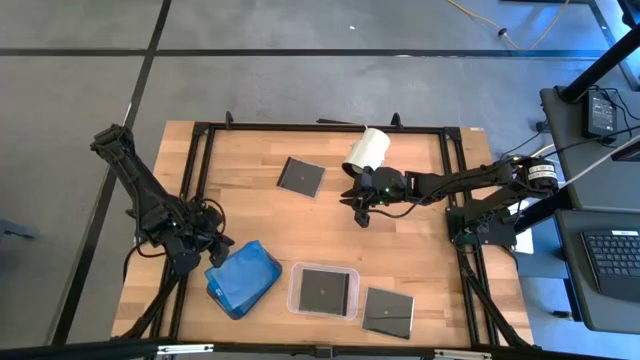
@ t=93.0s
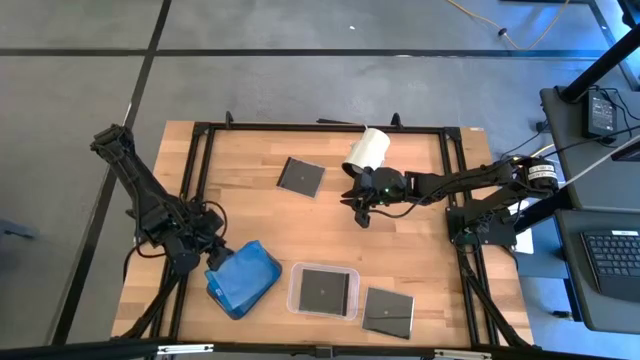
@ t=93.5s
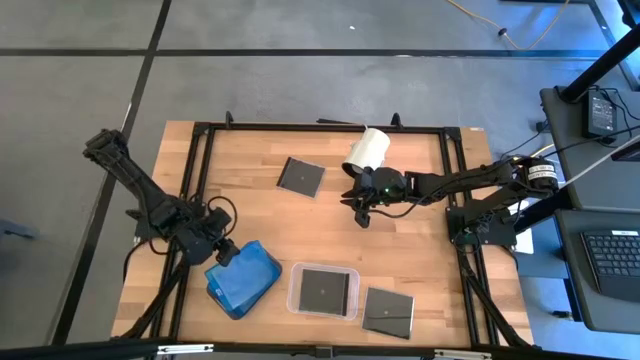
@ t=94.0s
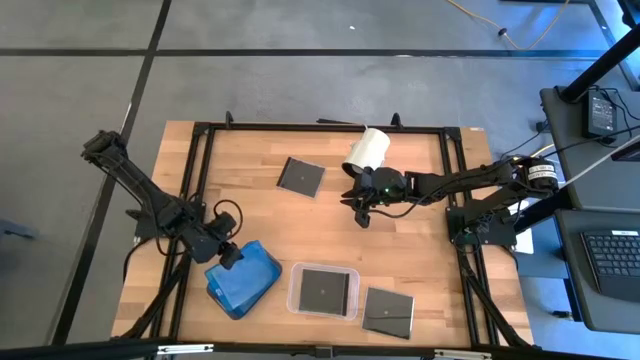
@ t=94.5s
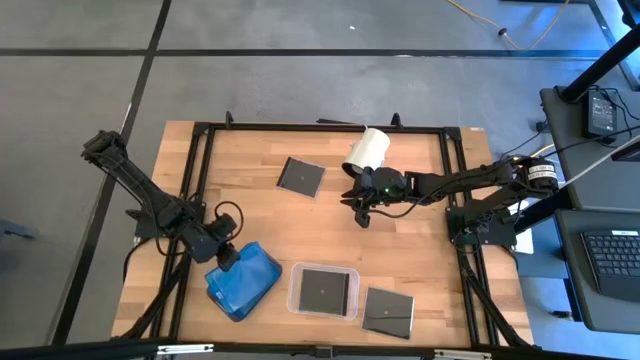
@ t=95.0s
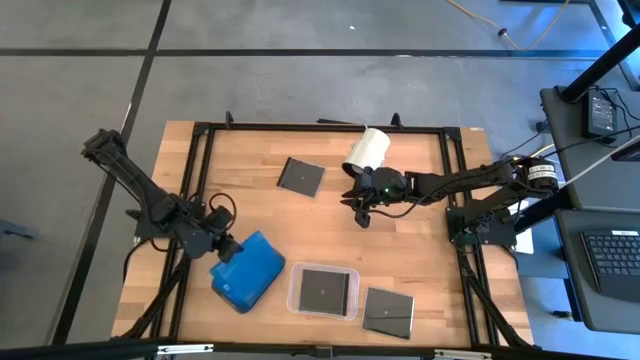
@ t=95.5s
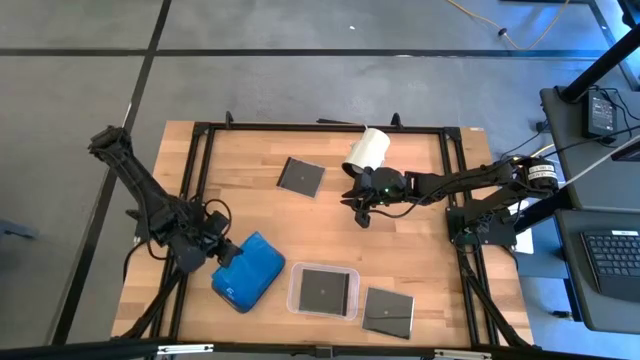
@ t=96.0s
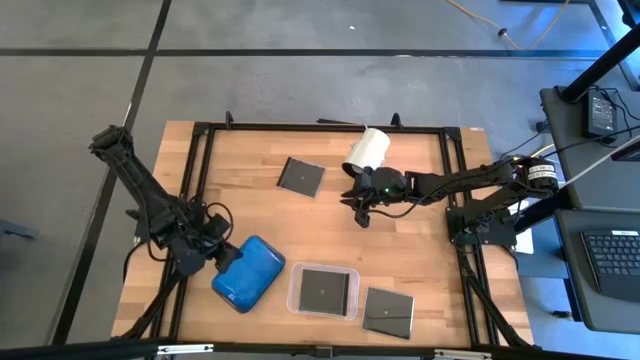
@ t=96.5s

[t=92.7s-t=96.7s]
Task: Pick & place jewel cases by type
Put the blue CD case into the black bin

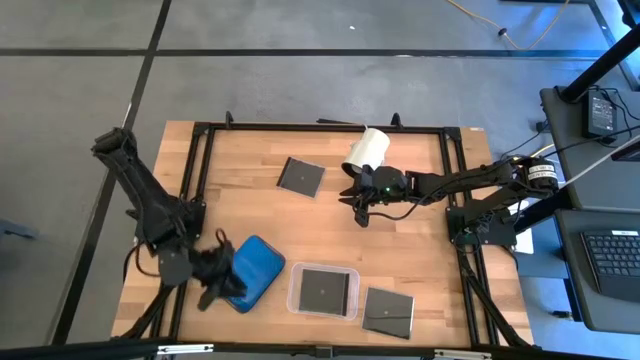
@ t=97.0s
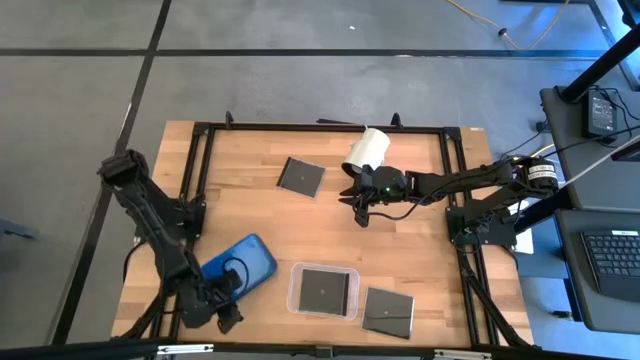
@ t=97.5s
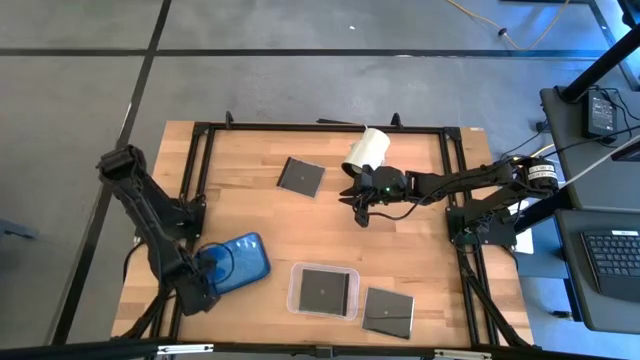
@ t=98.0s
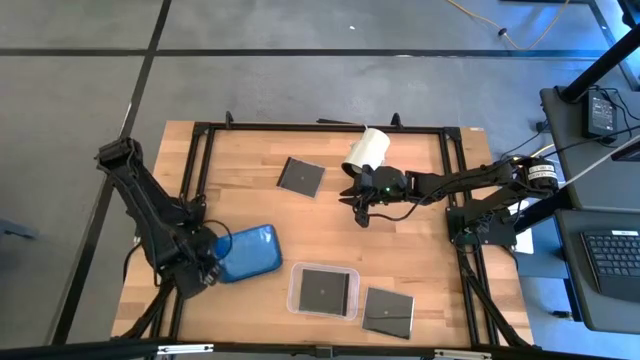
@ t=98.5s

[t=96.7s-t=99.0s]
Adjust the black bin on the table

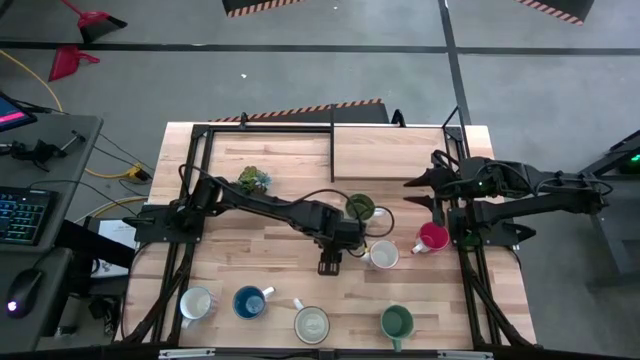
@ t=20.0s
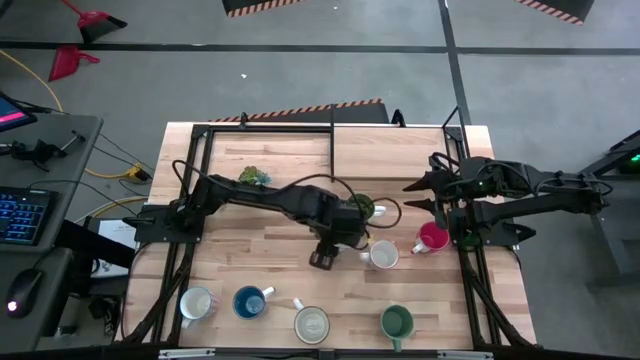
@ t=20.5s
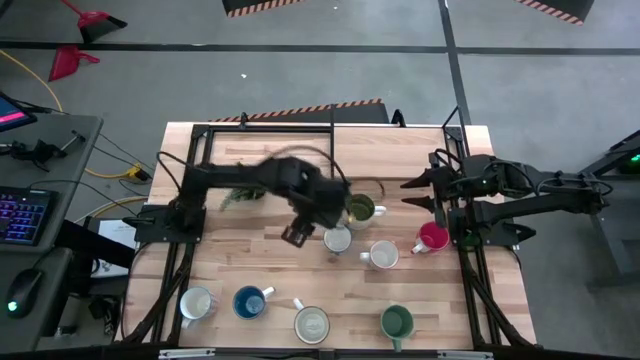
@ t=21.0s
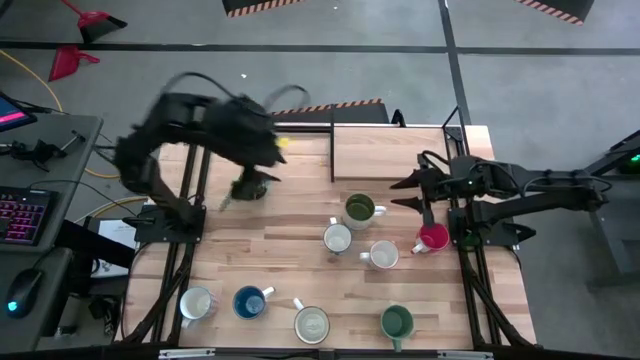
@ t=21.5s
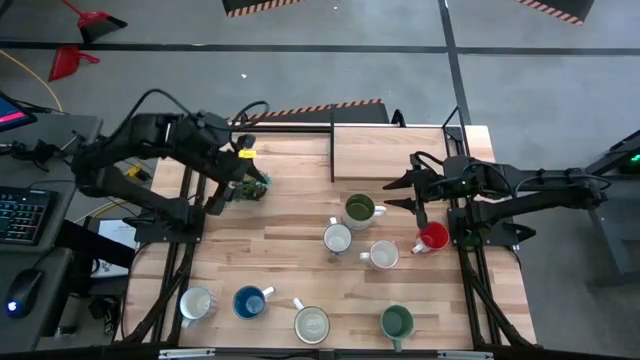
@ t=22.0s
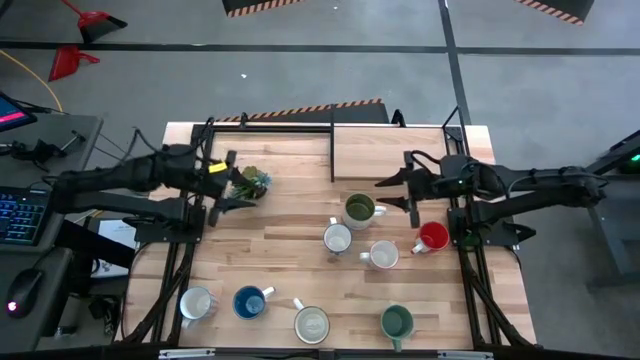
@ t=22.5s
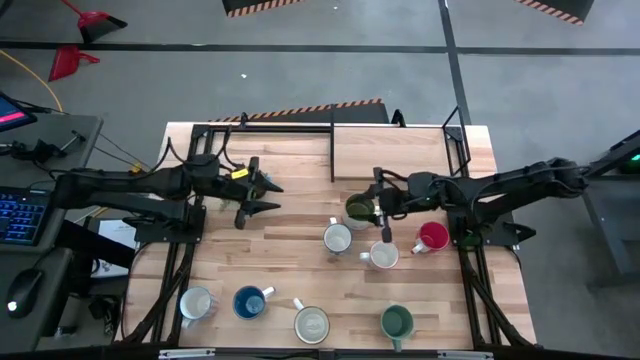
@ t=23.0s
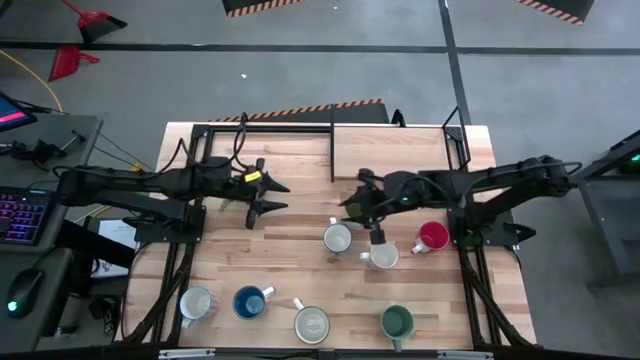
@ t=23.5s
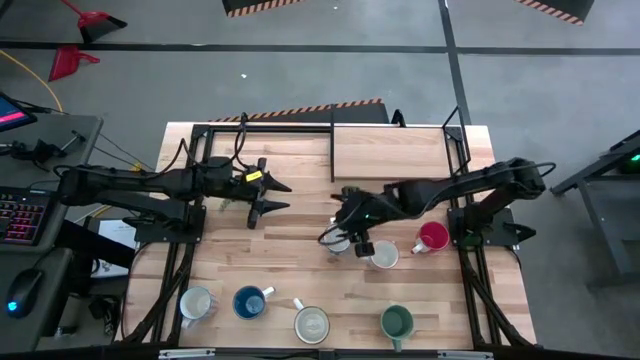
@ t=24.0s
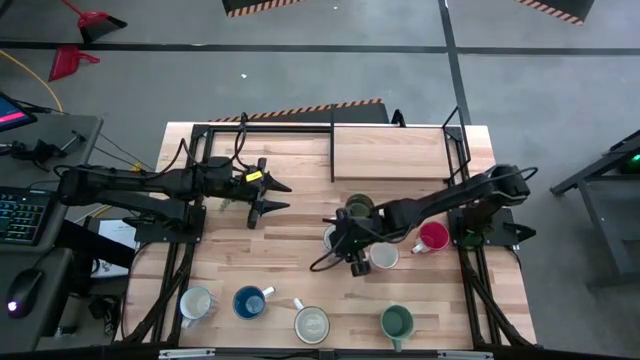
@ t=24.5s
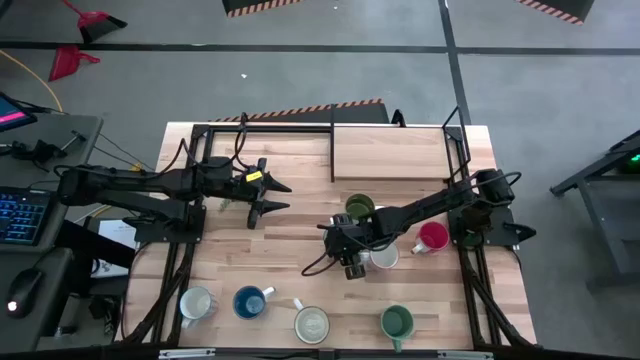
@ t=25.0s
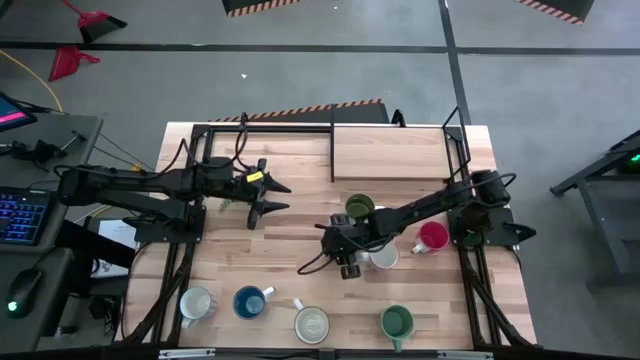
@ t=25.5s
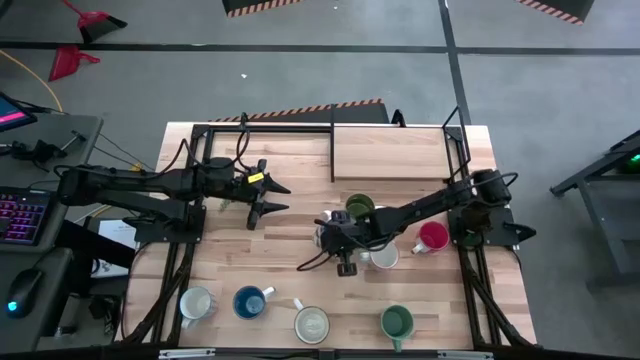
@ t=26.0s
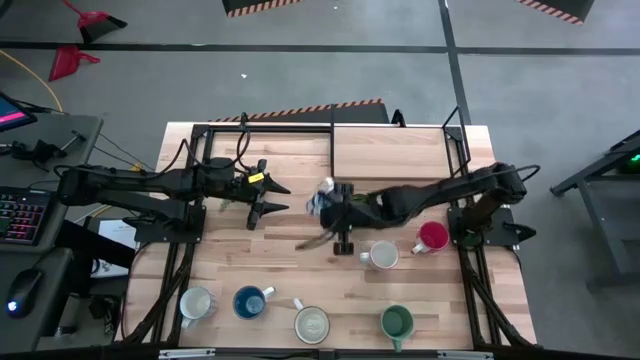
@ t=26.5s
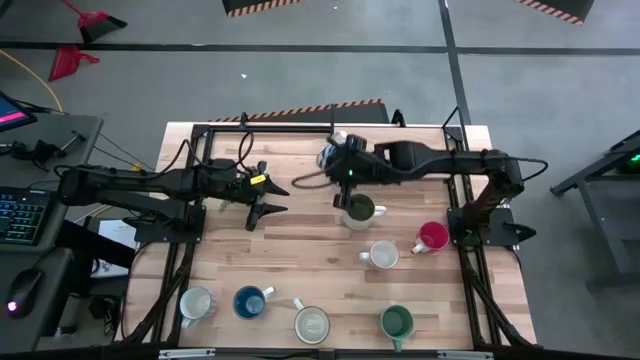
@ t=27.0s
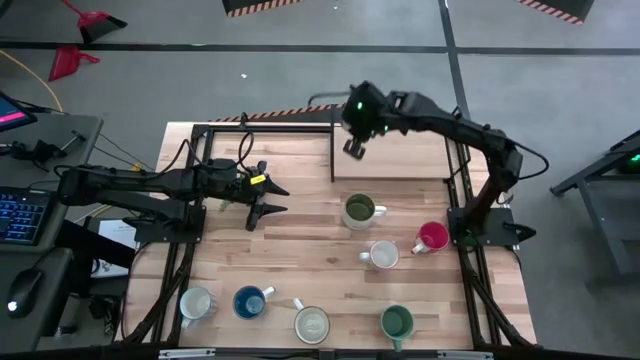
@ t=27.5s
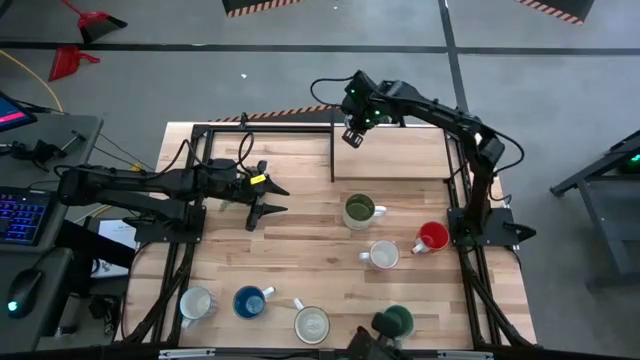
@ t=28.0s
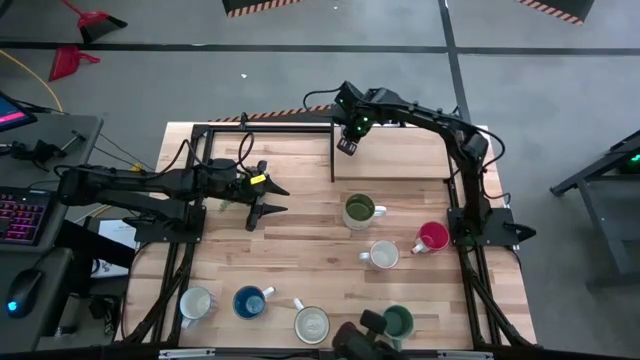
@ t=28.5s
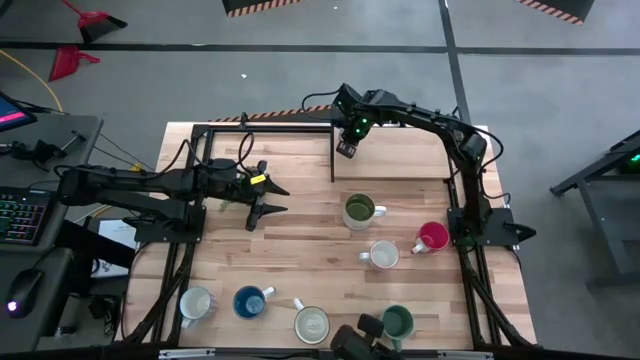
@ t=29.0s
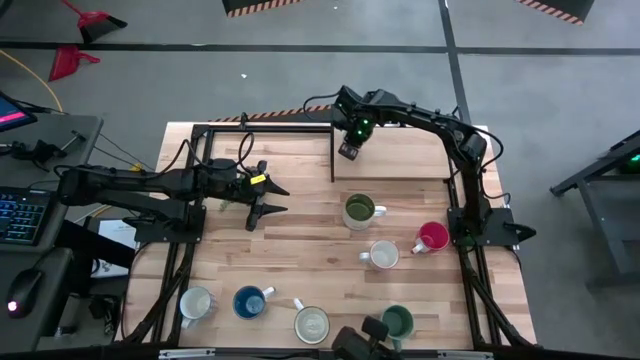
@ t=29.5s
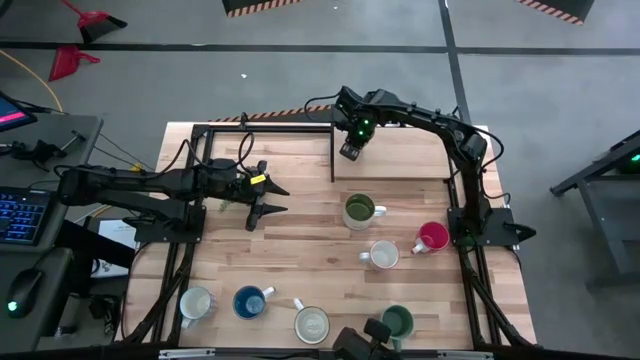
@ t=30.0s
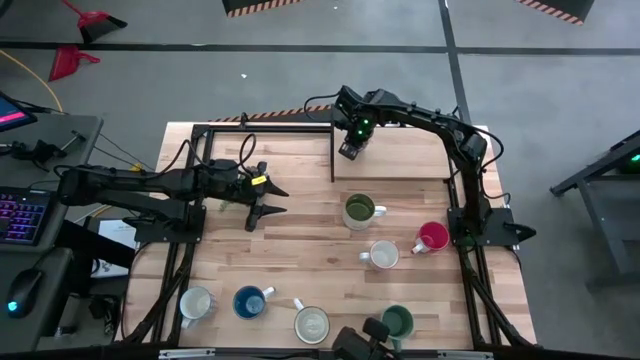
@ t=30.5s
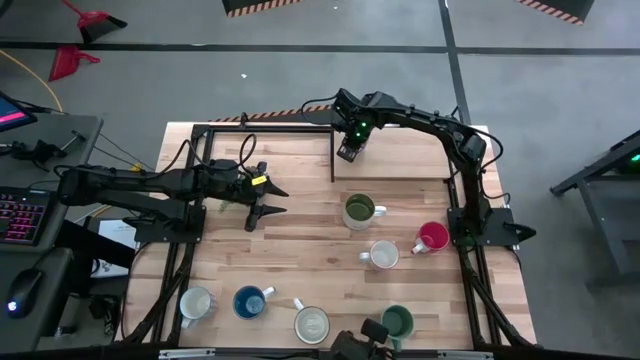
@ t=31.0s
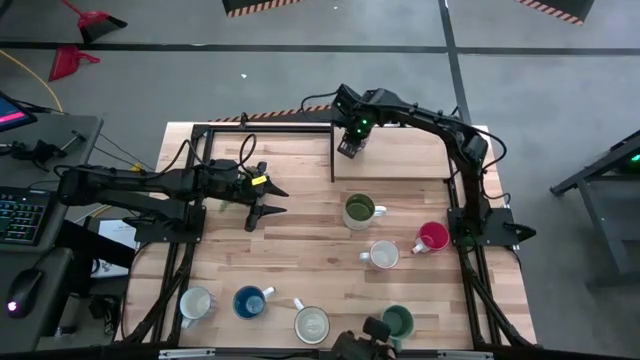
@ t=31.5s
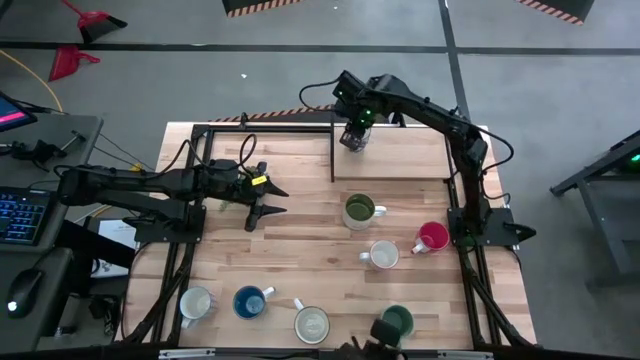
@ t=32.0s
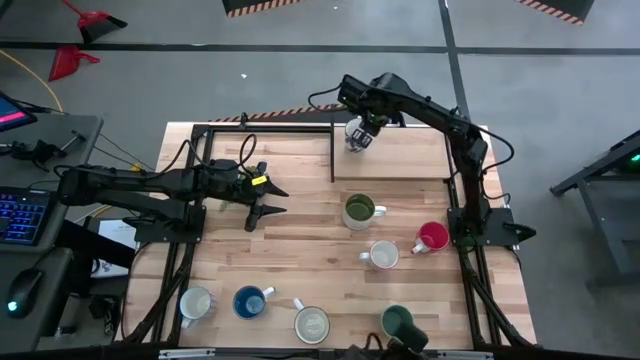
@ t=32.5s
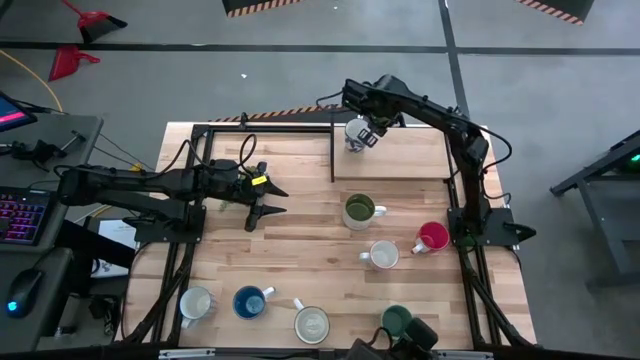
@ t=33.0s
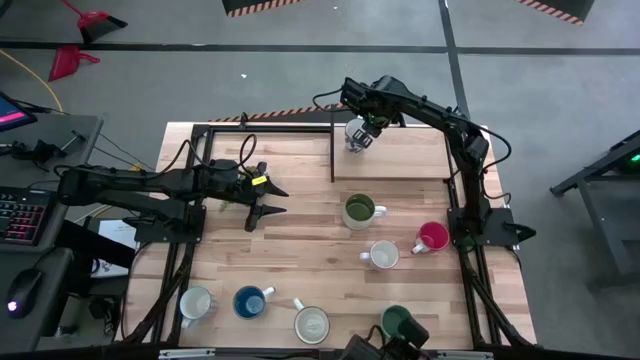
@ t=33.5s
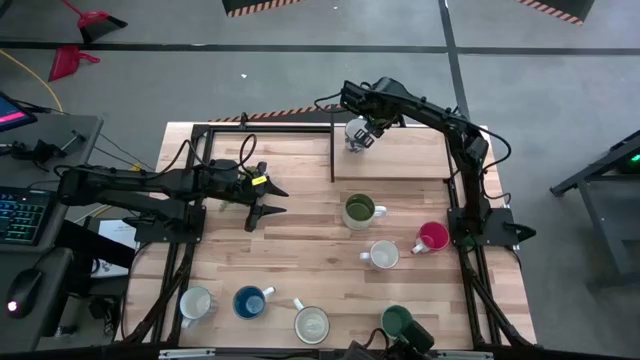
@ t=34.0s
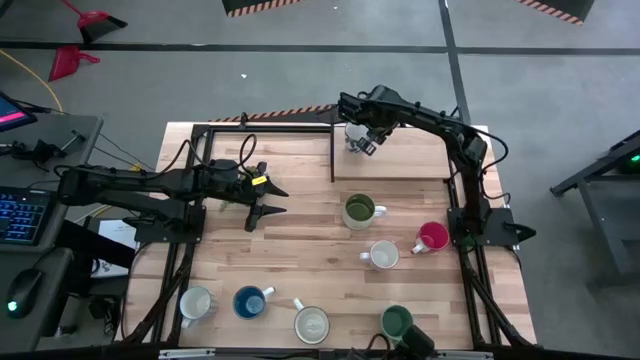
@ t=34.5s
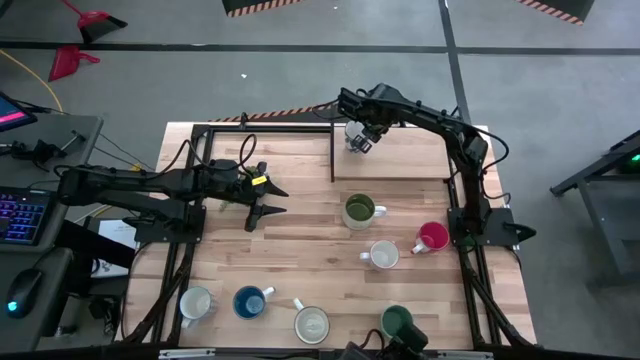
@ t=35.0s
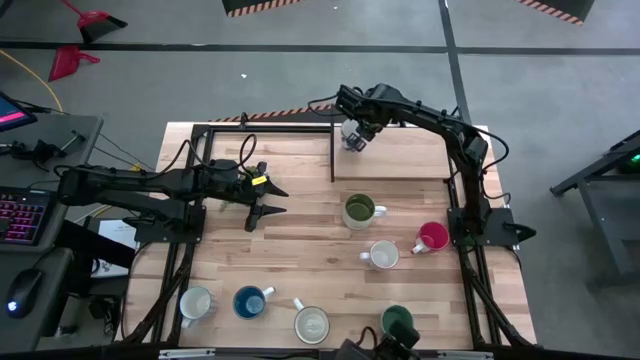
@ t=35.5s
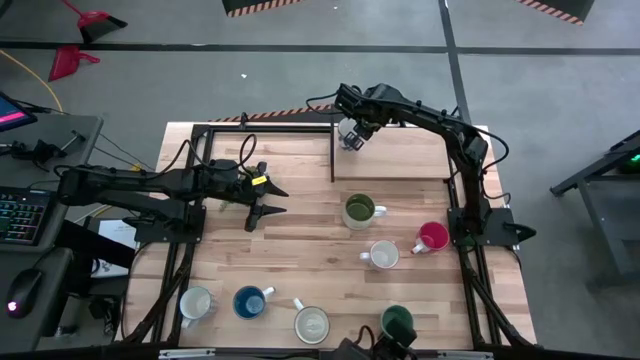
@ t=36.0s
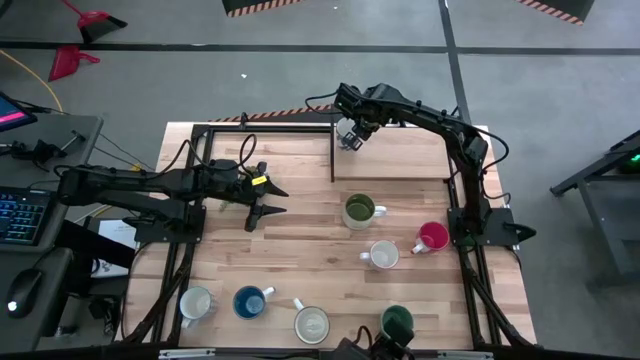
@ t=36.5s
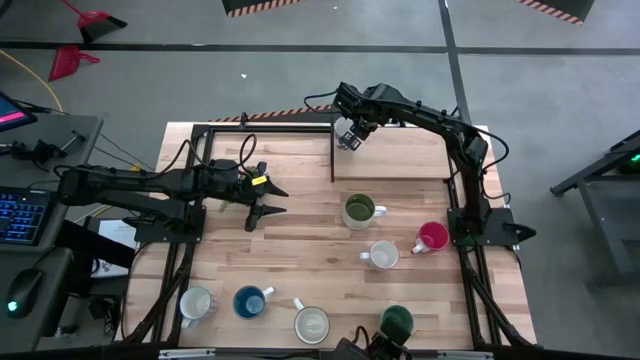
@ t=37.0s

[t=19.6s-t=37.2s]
Task: Place coffee mugs
Put the white blue mug on the shelf
